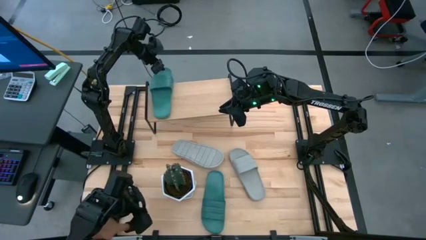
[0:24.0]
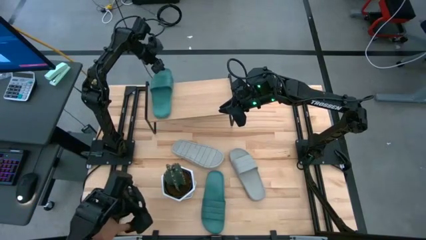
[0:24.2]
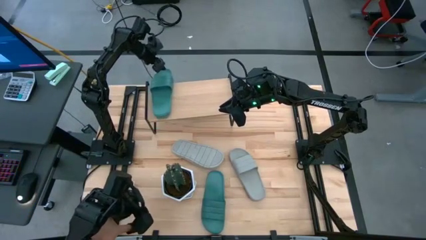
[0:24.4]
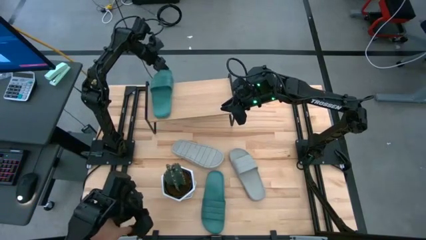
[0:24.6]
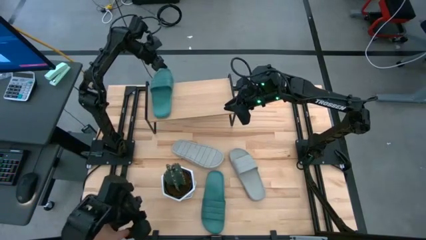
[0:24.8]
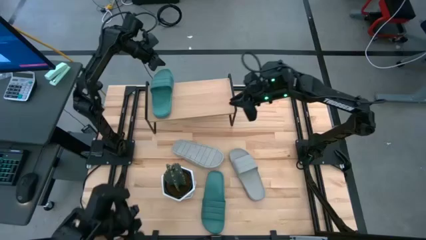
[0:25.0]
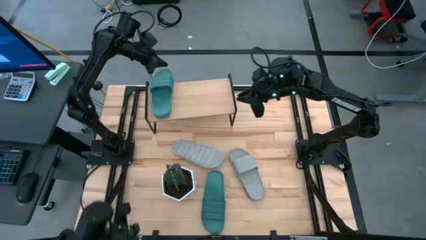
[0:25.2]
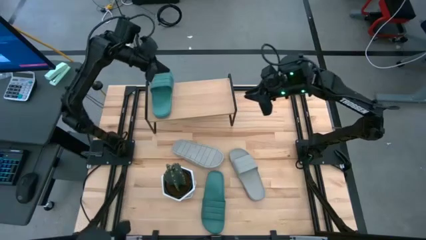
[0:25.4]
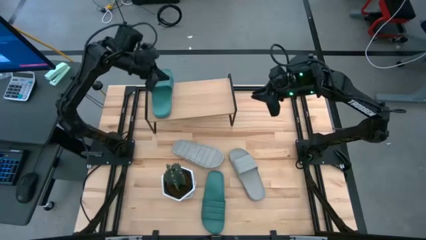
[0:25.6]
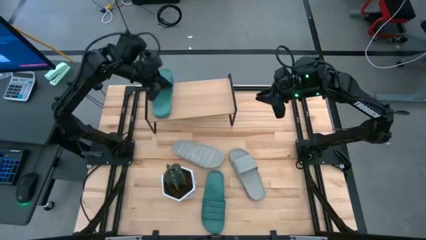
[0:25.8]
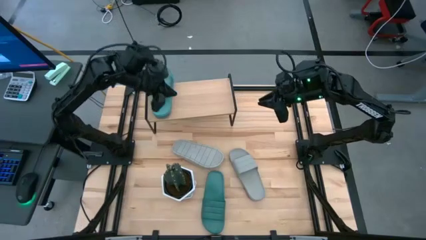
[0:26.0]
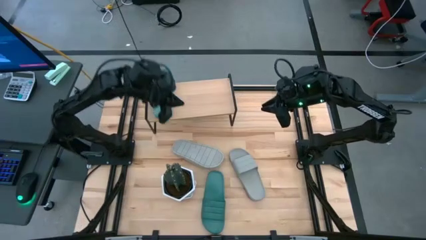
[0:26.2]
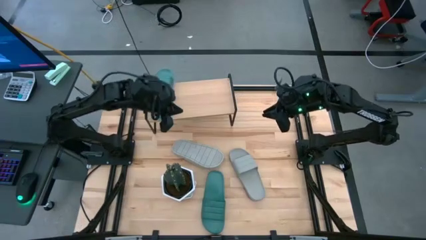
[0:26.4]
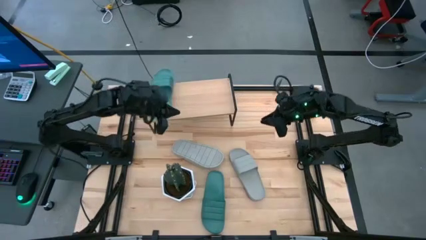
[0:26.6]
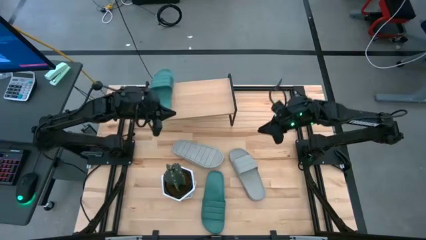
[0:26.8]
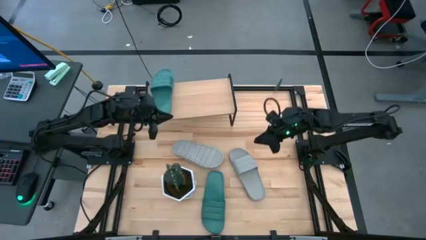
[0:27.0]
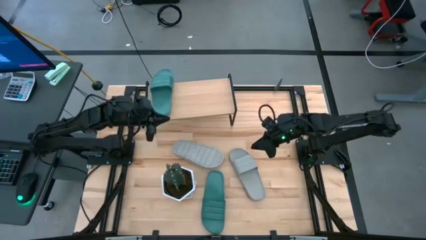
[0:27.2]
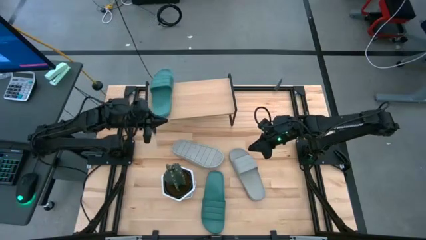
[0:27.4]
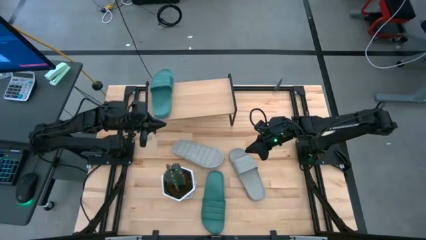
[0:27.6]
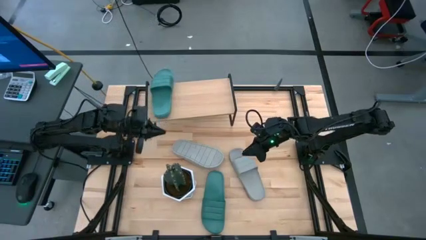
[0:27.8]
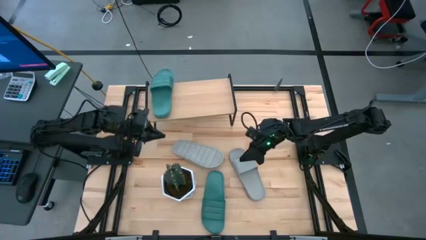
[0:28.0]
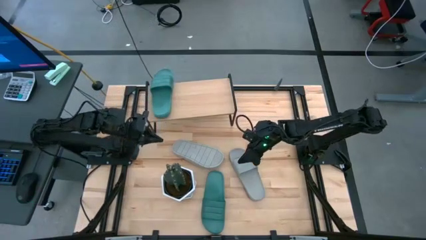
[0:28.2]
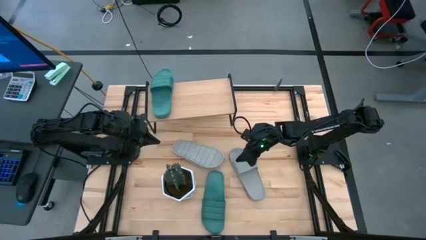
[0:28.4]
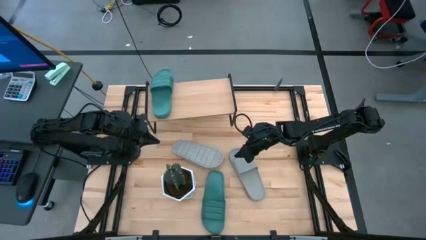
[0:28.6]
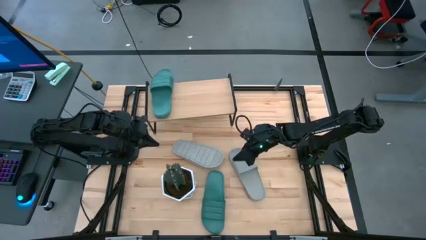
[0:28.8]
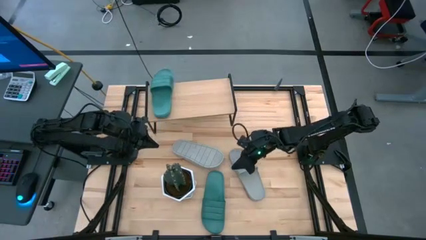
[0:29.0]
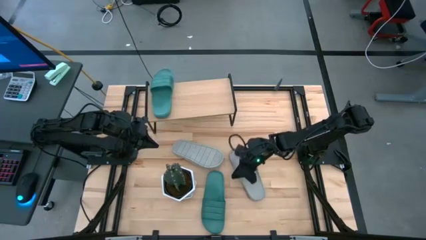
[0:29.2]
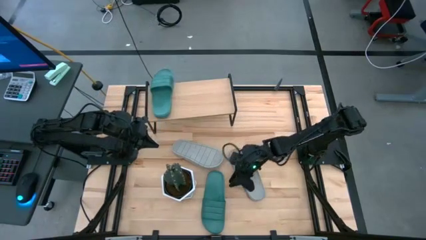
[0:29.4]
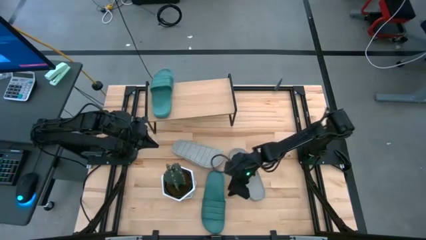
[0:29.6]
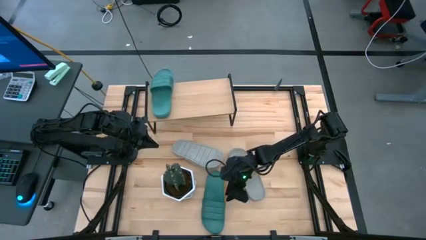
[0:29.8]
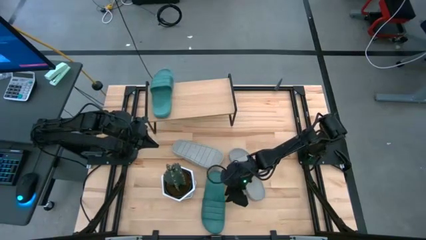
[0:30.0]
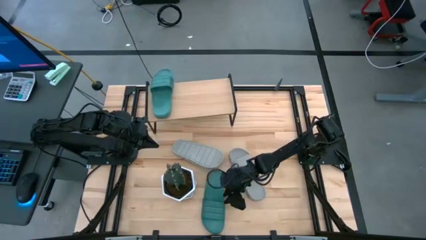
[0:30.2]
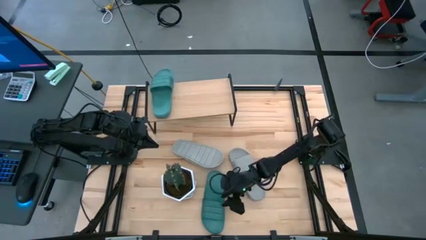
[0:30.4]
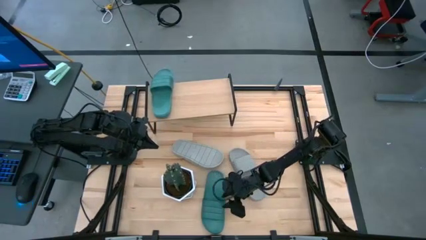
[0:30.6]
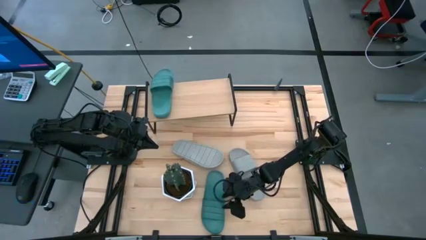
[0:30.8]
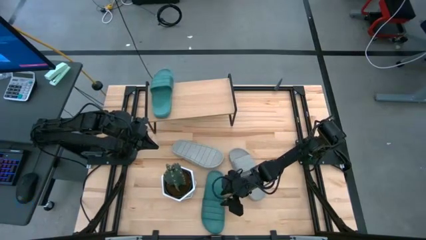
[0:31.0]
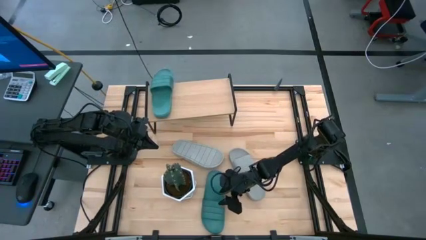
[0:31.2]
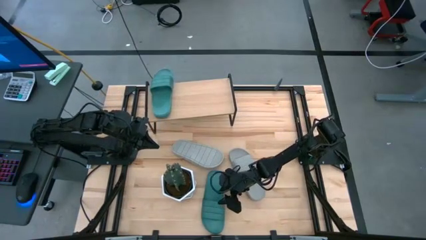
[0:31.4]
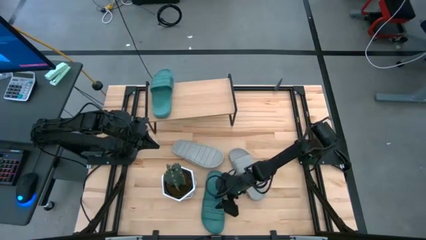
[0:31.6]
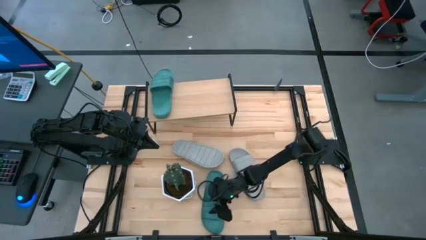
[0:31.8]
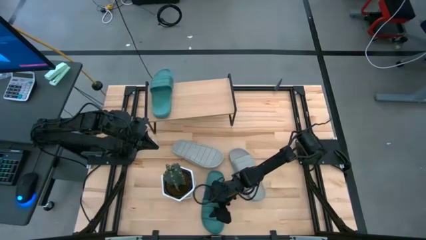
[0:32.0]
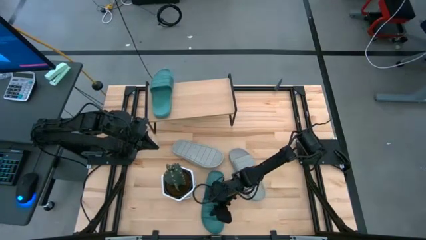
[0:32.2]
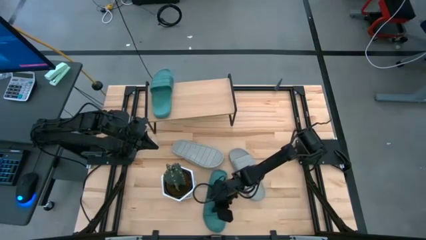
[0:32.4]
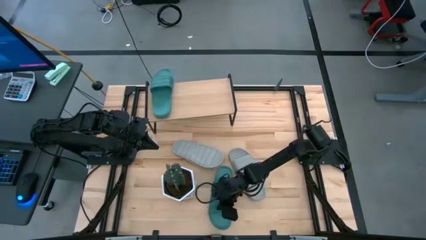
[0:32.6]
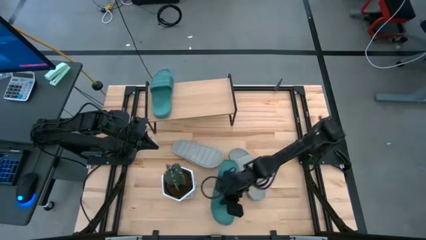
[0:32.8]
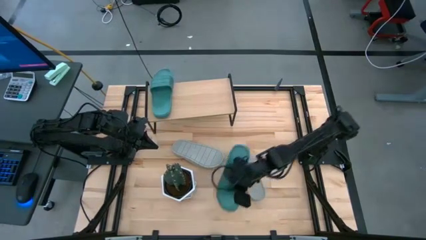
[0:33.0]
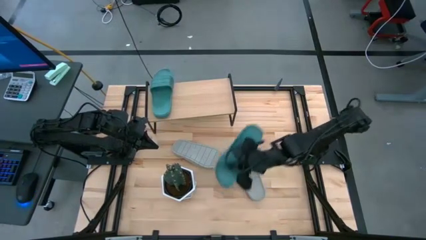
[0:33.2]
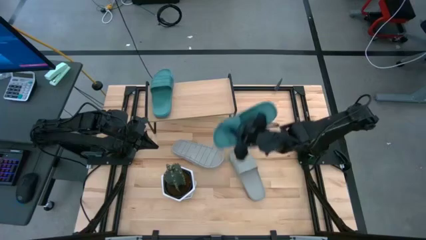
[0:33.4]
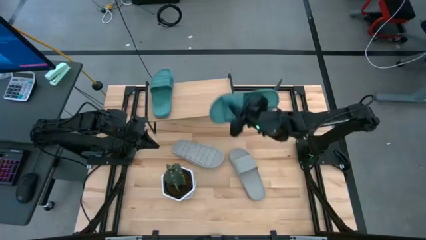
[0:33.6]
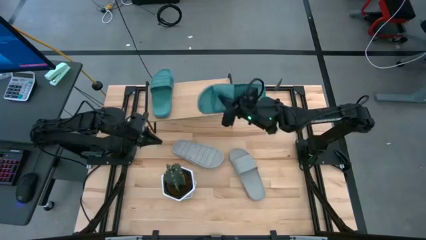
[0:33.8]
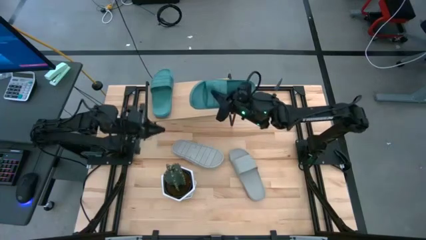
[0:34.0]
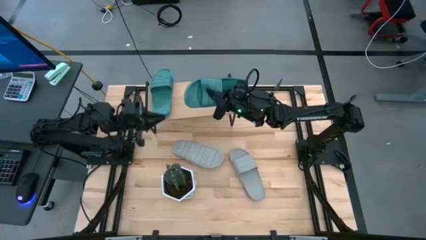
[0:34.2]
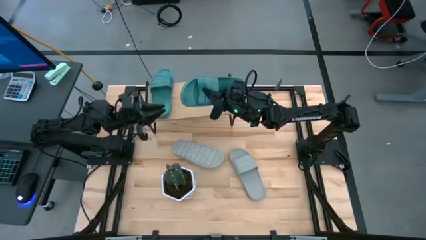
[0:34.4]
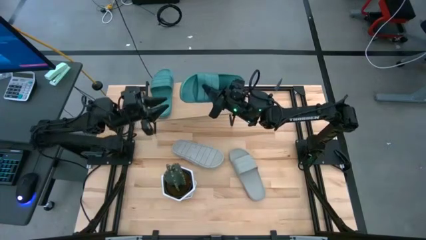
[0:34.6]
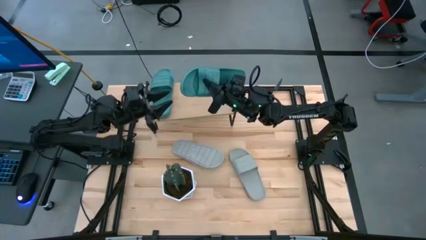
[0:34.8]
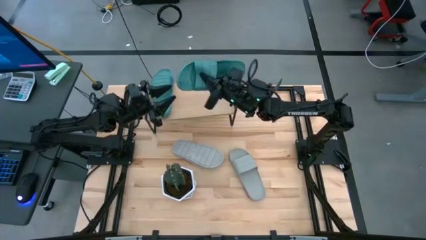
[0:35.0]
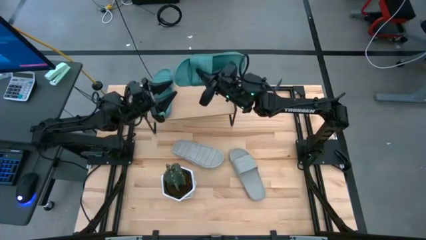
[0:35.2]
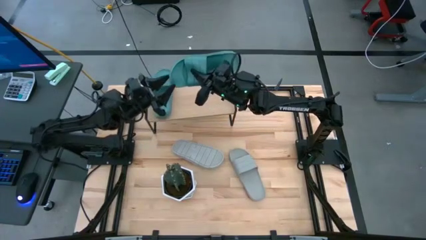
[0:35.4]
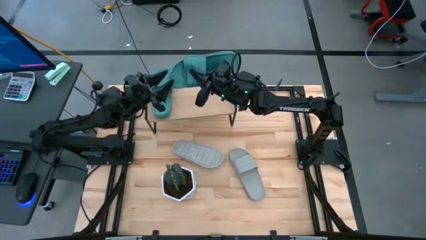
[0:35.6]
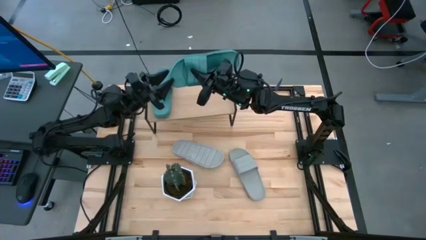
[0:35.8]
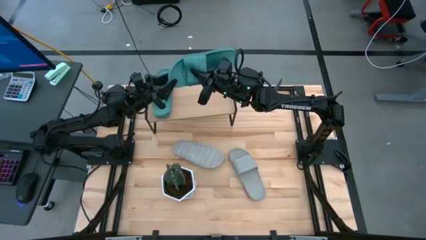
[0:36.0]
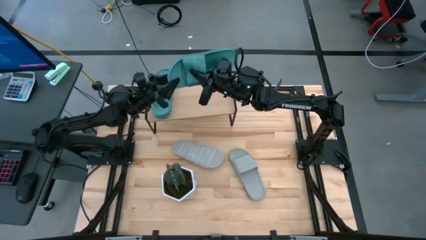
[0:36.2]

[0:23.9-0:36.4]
Task: Pick and place slides into the shelf
Put the green slipper on the shelf
